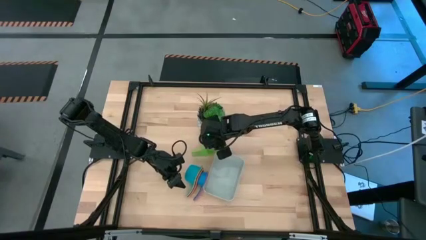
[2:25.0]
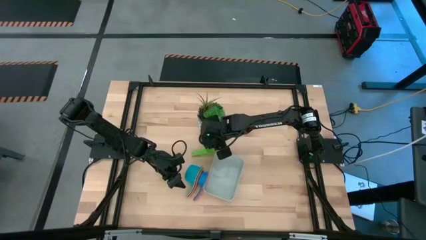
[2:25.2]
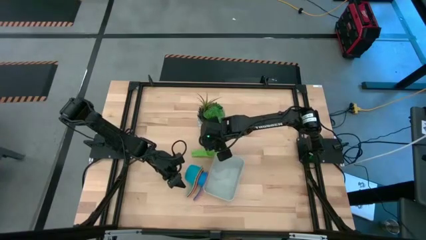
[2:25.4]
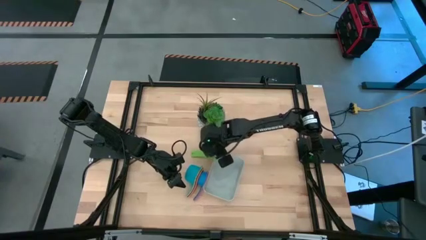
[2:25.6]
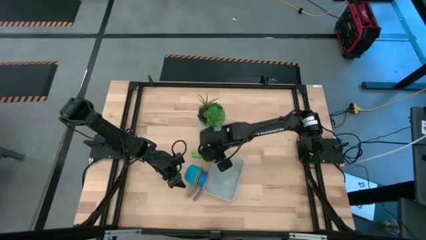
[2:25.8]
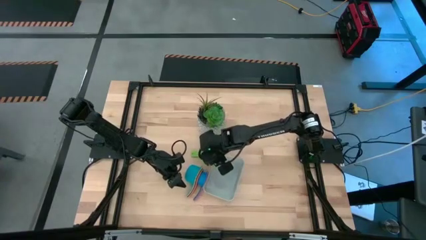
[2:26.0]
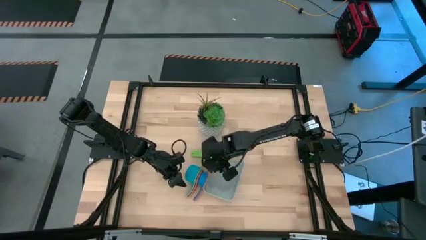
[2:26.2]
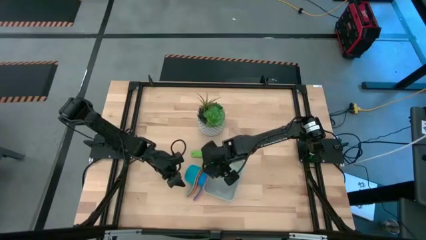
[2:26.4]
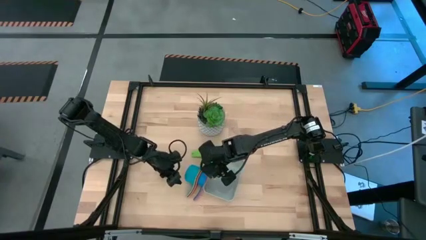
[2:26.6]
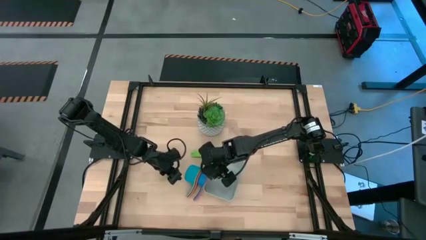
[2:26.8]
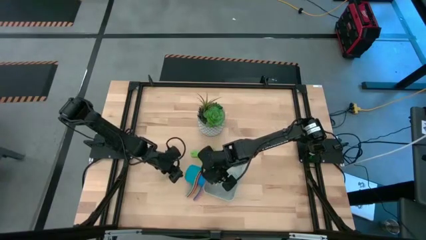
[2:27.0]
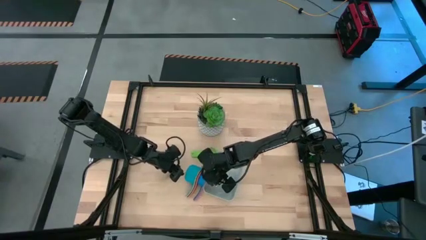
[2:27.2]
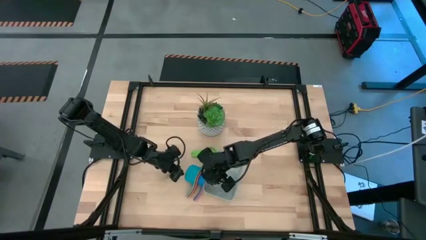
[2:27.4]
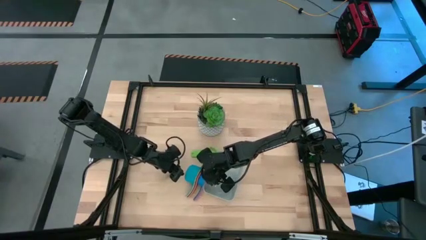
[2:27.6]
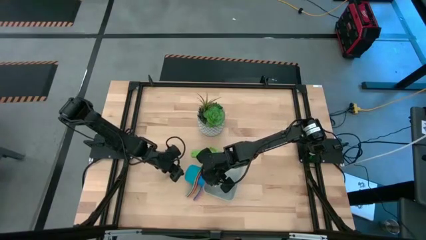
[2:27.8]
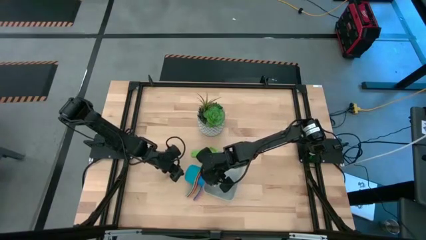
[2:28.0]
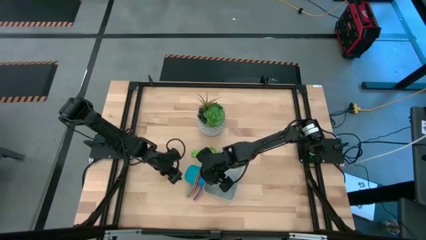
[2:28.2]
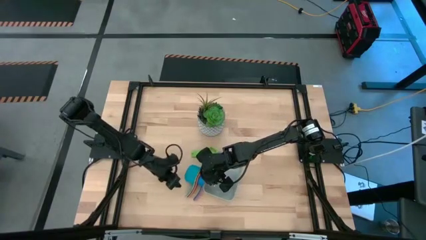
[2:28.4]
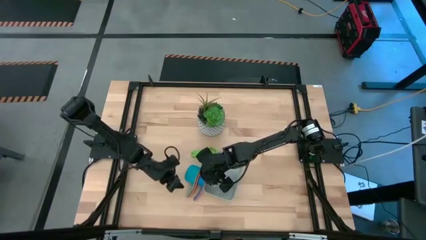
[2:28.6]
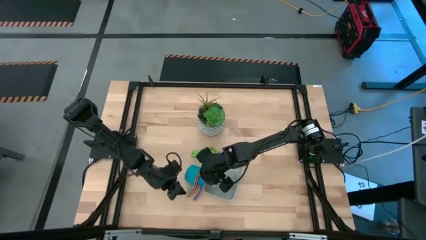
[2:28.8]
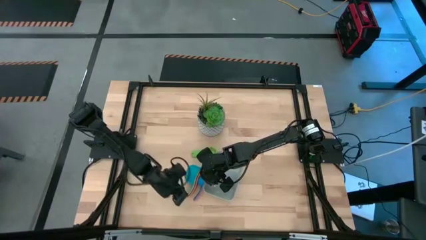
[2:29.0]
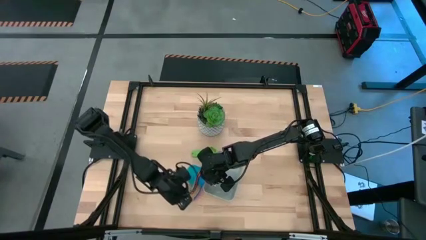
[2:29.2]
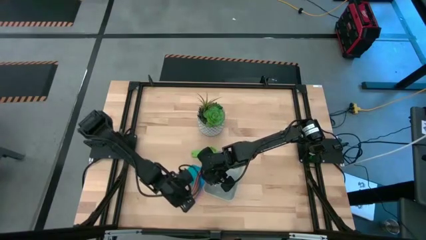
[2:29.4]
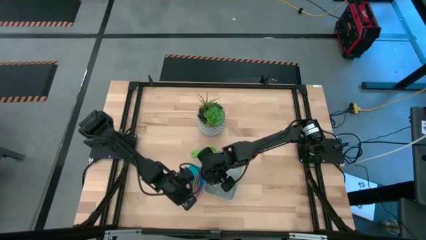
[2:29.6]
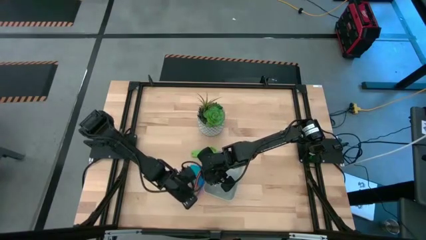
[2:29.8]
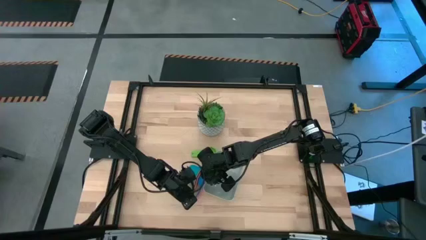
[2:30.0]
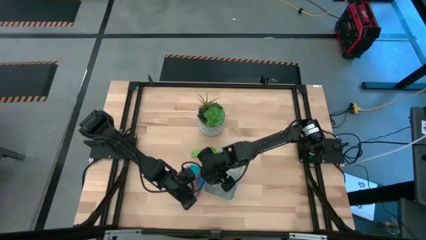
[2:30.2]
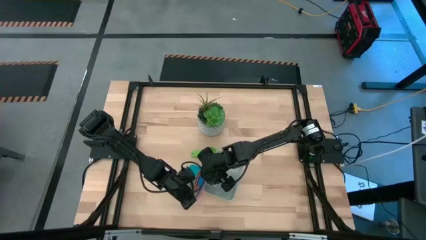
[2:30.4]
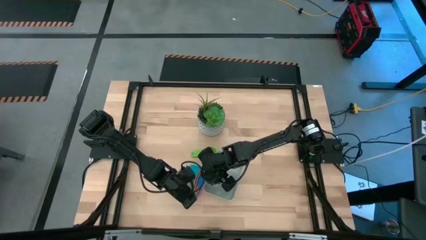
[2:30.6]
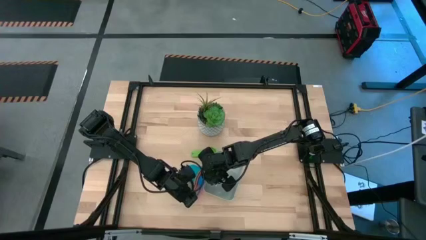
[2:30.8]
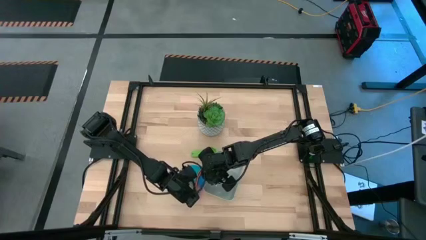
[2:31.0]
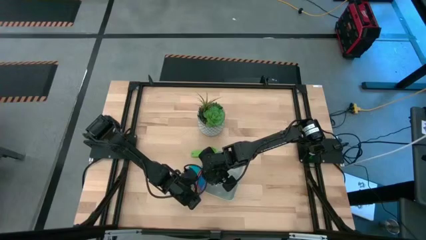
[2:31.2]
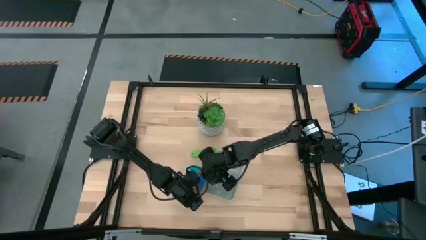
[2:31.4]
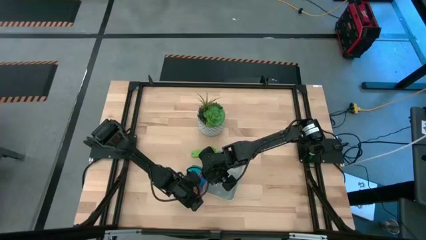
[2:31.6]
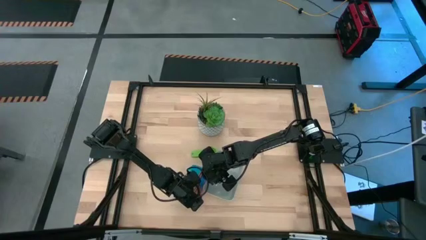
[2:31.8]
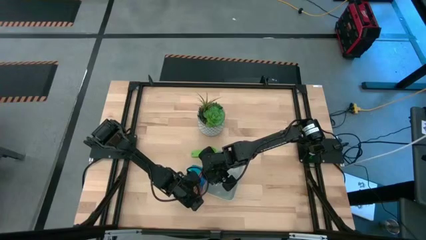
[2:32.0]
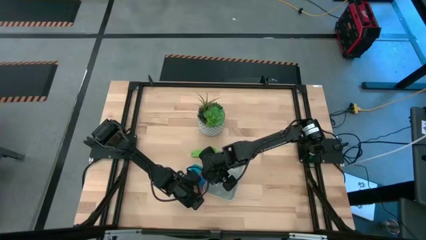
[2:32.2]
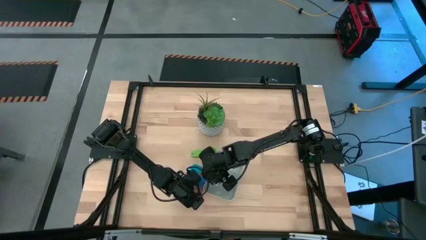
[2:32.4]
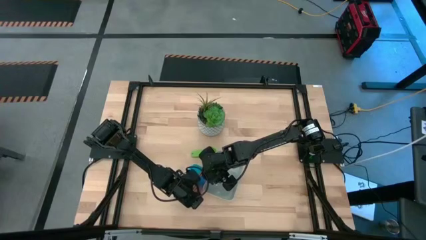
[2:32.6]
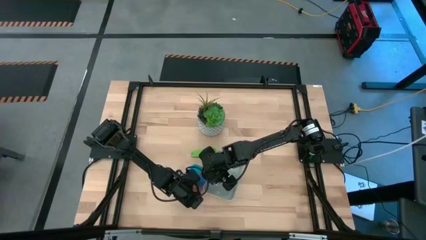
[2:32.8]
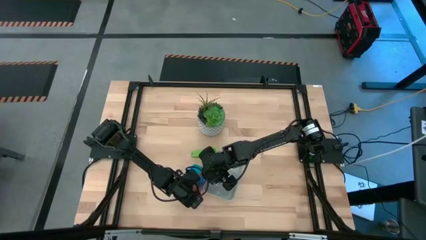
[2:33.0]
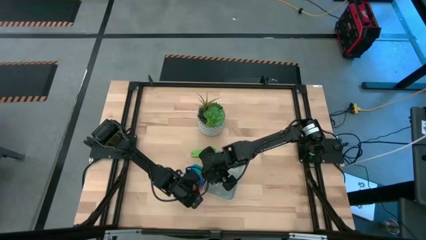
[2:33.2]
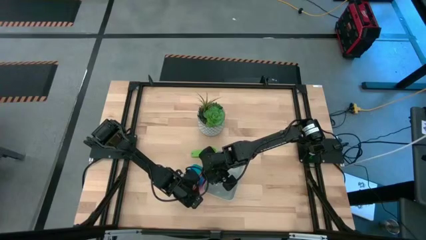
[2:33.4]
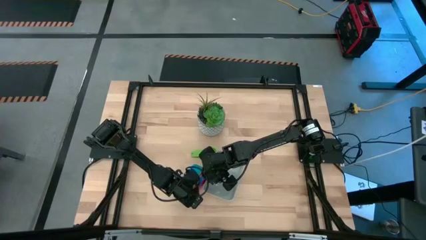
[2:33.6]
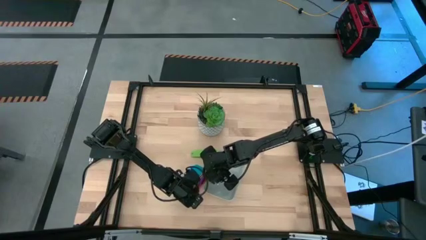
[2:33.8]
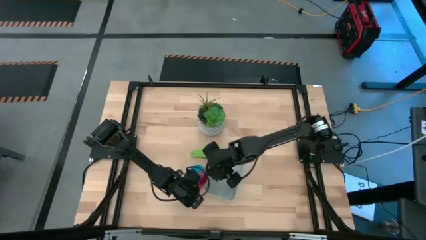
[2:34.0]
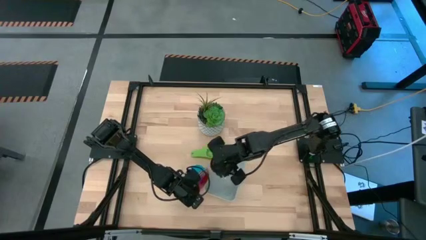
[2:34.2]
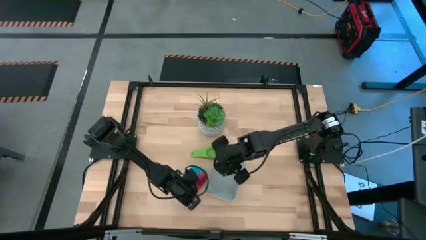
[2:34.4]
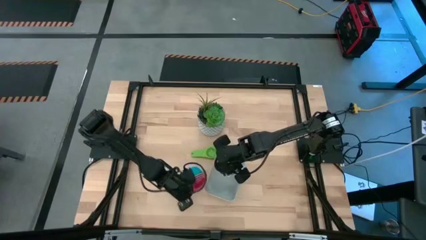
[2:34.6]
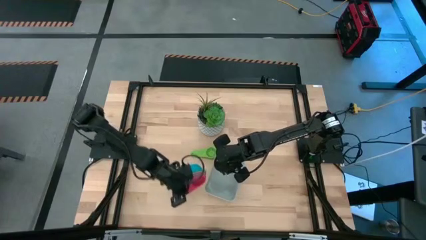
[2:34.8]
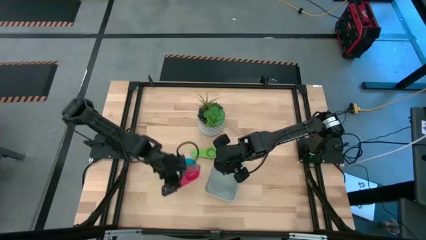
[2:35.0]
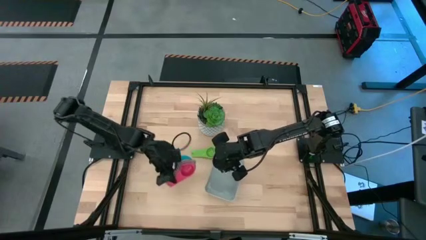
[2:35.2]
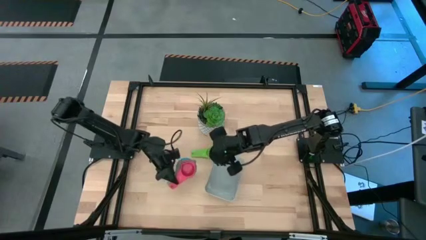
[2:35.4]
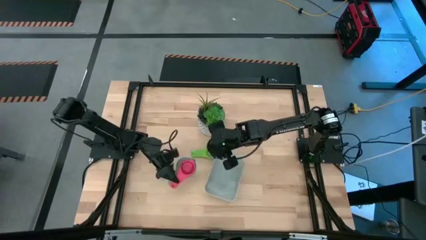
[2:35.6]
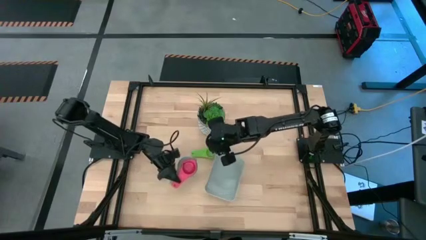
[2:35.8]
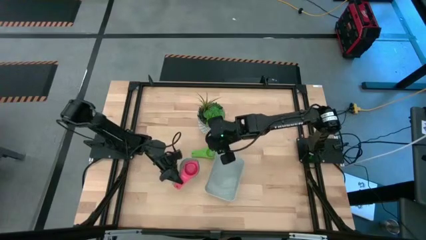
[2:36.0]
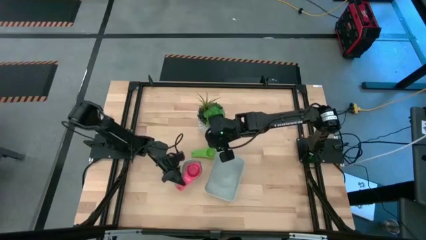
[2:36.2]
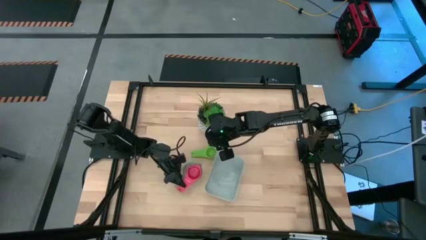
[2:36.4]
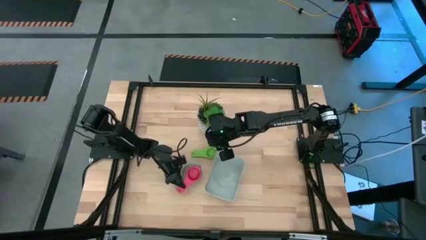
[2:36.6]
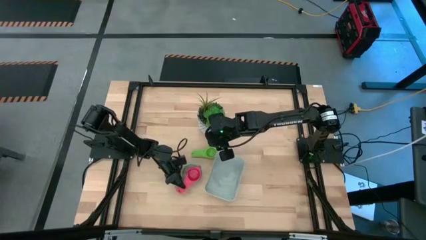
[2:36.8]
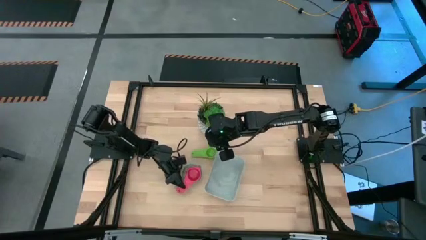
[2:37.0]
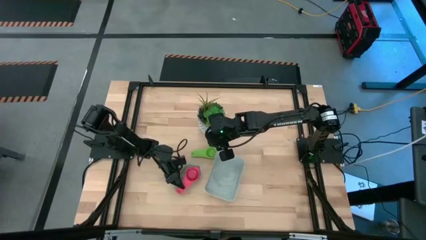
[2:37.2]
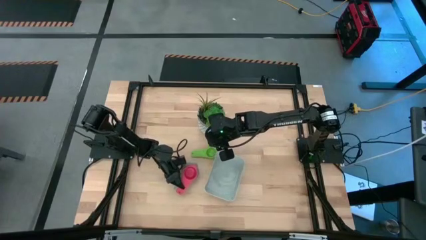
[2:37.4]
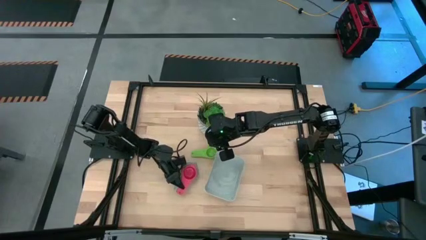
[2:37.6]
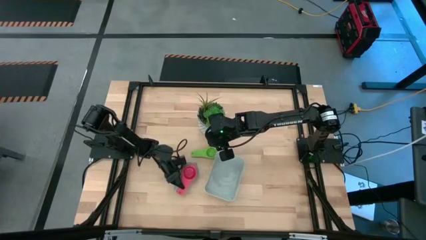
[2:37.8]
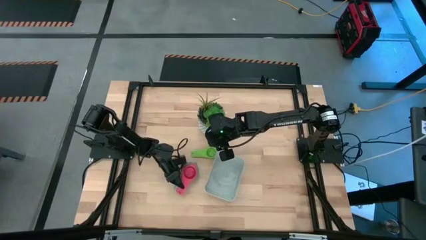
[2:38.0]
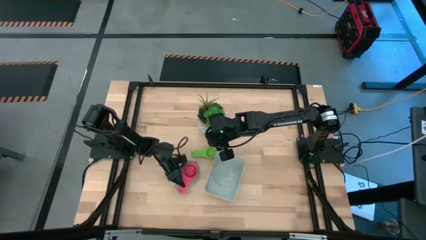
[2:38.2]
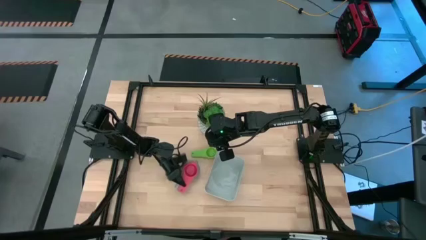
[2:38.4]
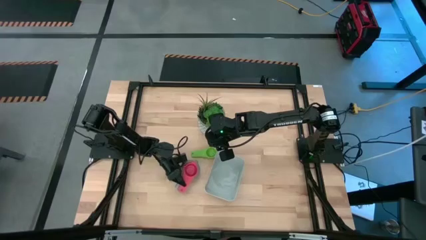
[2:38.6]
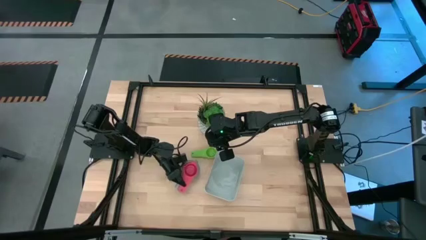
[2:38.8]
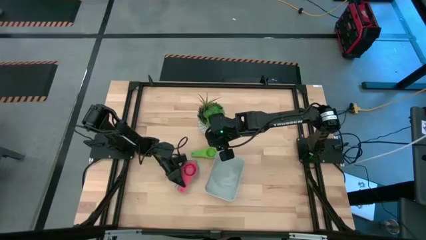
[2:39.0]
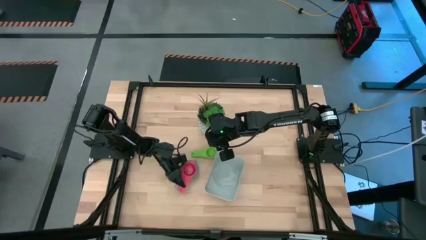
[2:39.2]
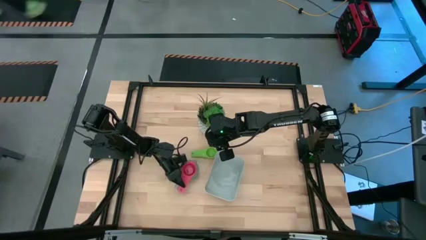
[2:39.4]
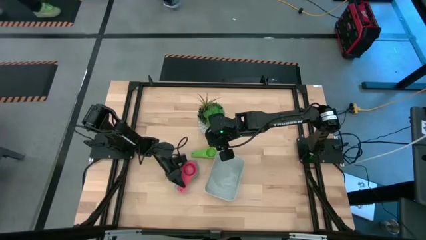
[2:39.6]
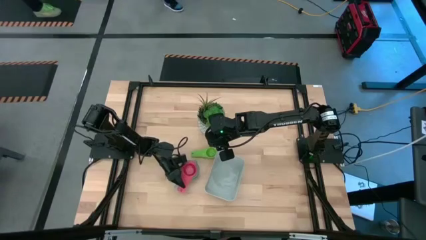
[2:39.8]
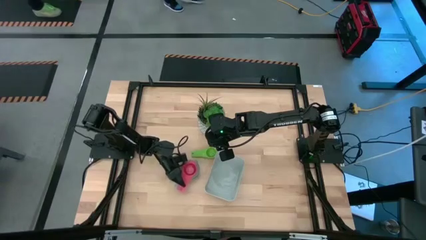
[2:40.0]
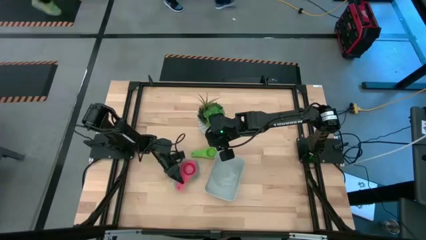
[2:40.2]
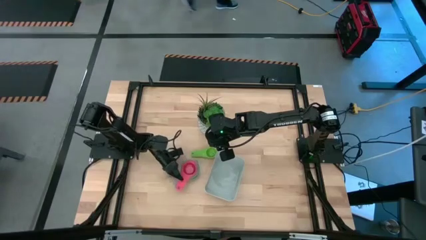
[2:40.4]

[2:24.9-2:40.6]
Task: Nest measuring cups in basket
Adjust the stacked measuring cups on the table
